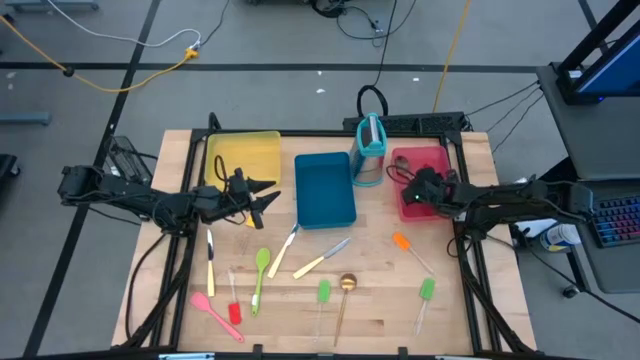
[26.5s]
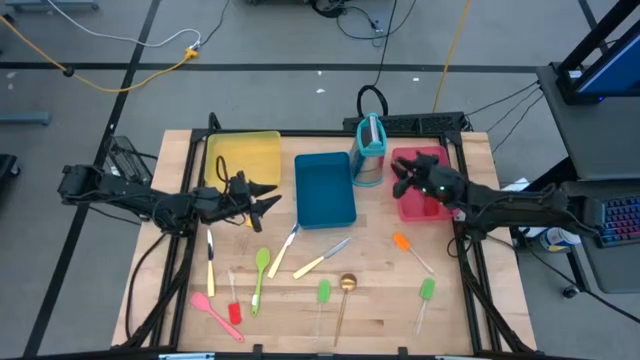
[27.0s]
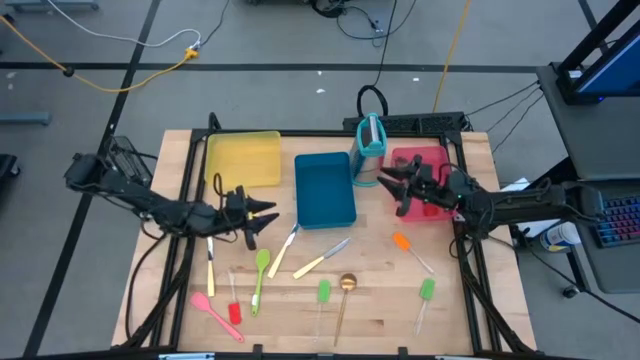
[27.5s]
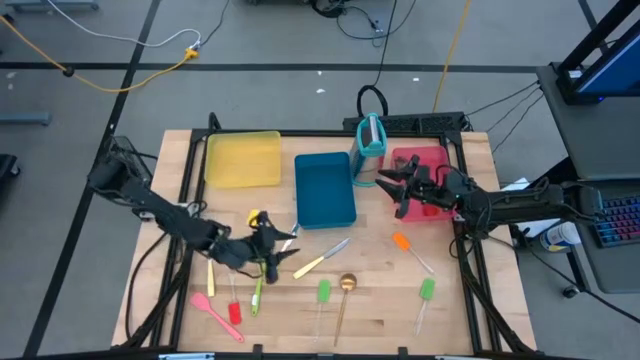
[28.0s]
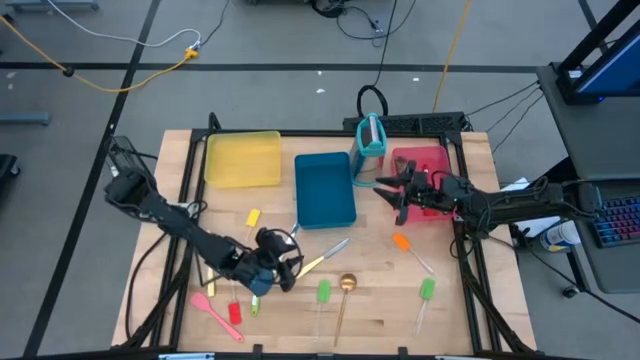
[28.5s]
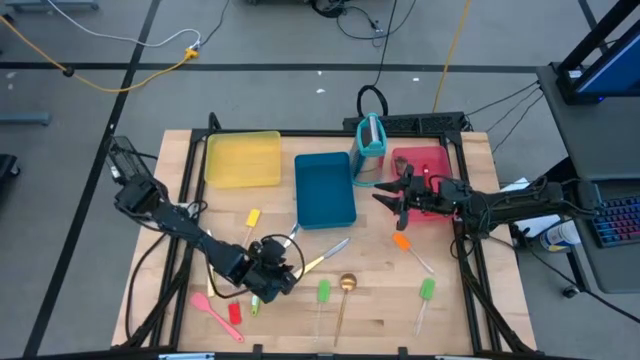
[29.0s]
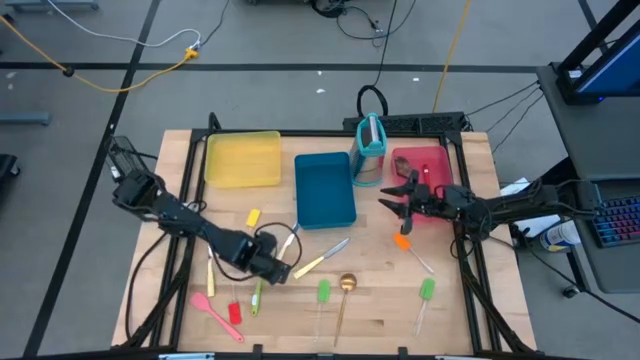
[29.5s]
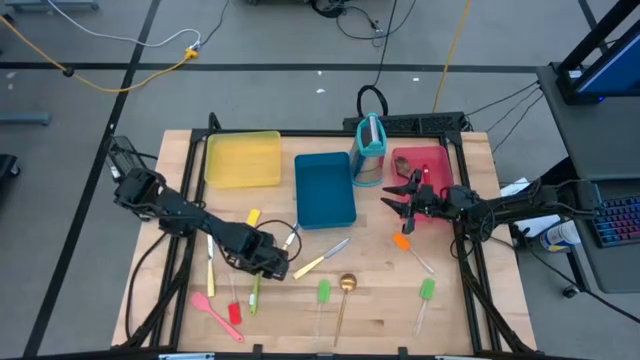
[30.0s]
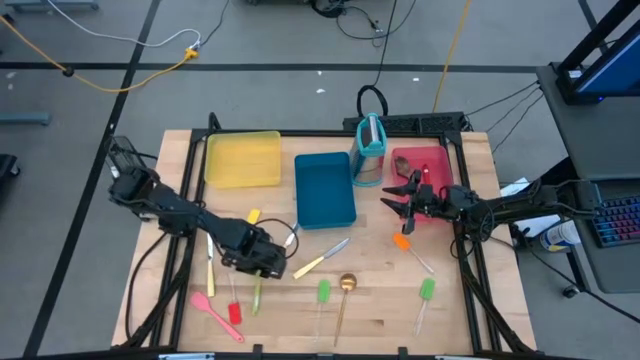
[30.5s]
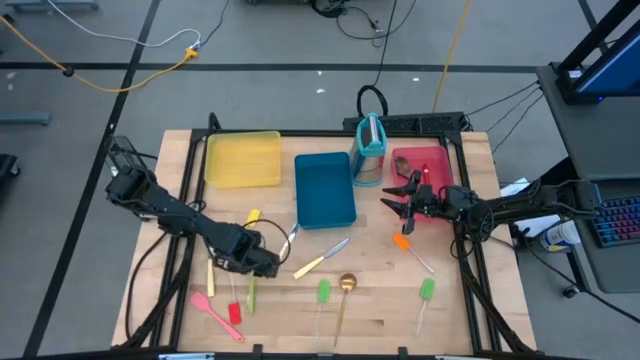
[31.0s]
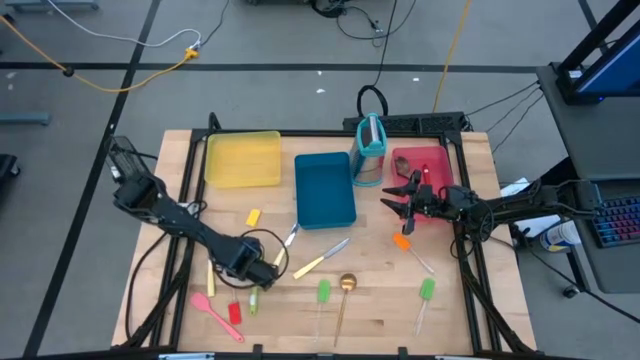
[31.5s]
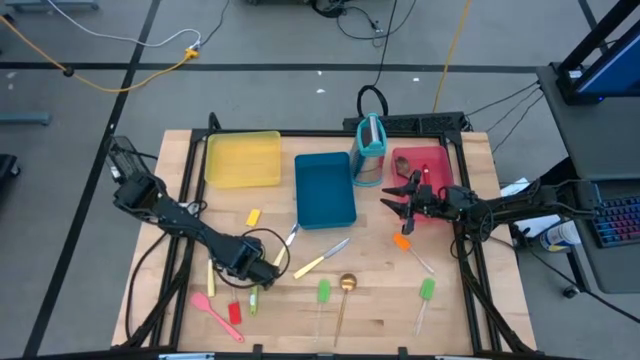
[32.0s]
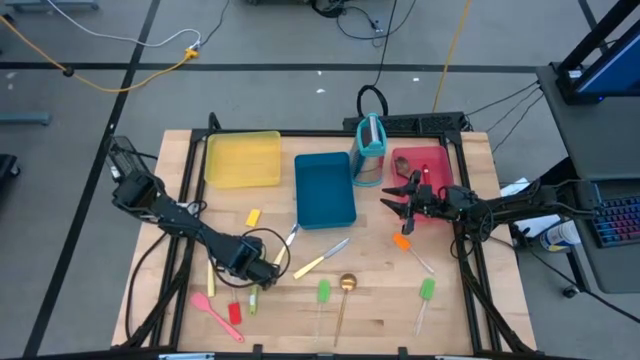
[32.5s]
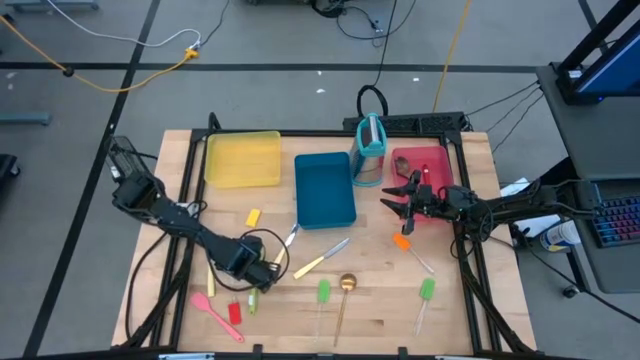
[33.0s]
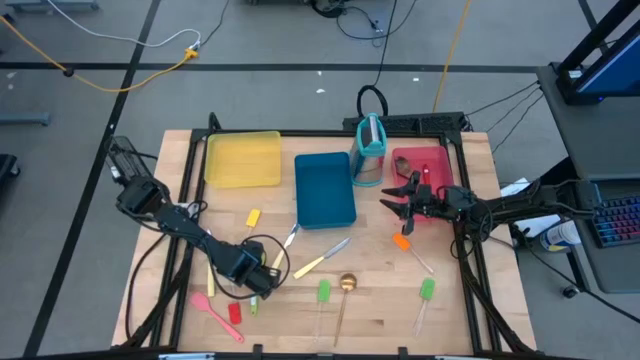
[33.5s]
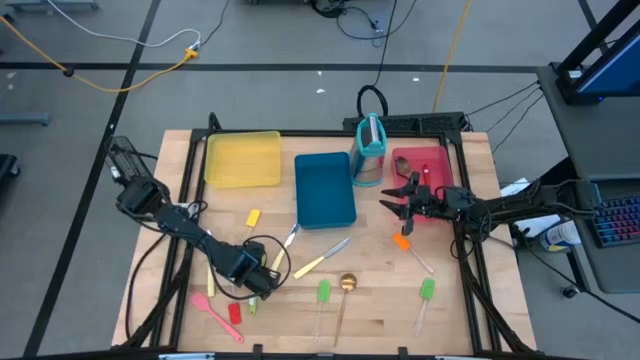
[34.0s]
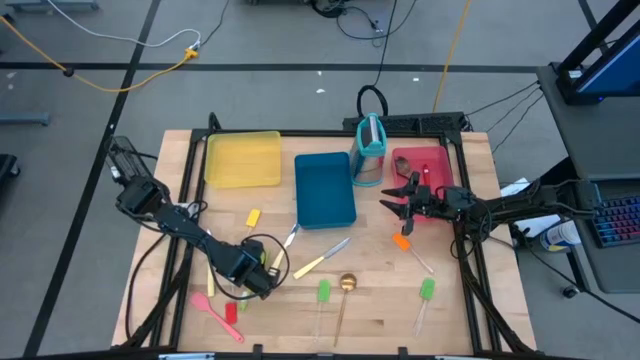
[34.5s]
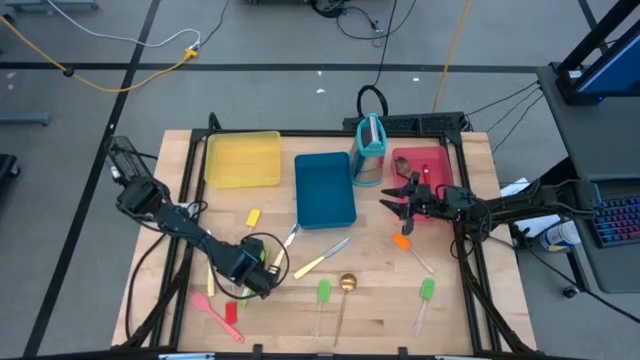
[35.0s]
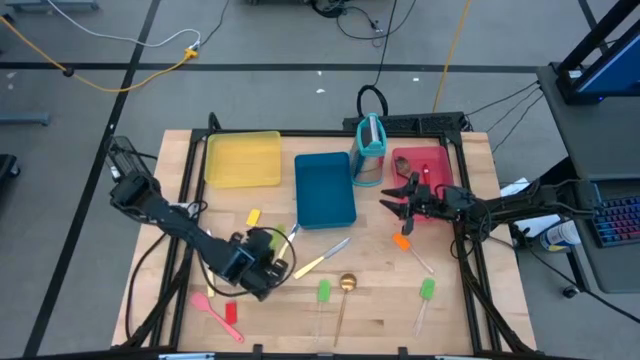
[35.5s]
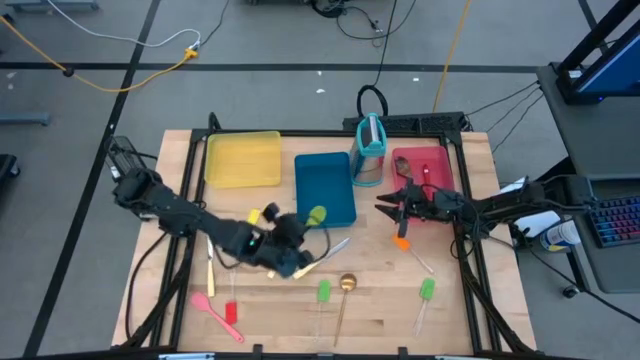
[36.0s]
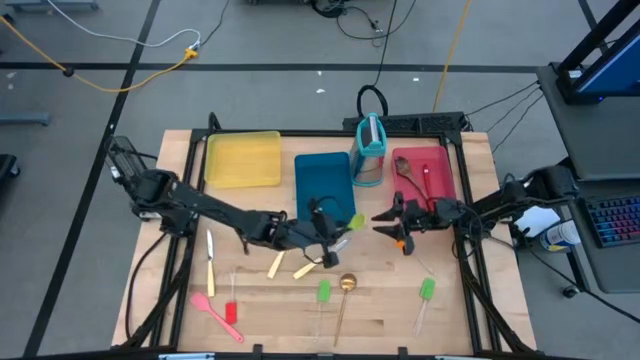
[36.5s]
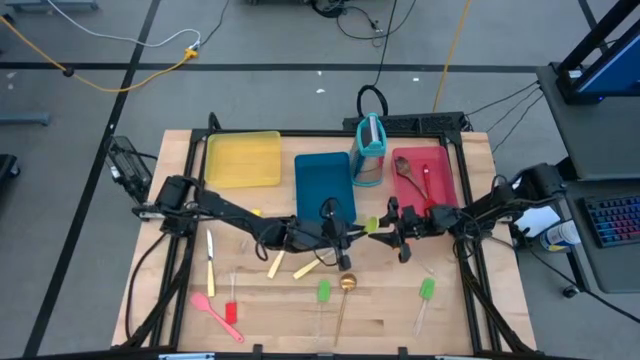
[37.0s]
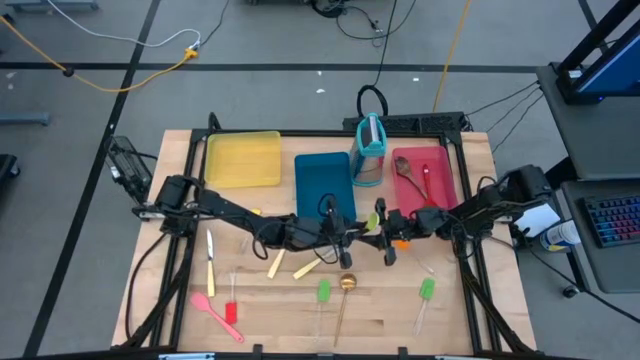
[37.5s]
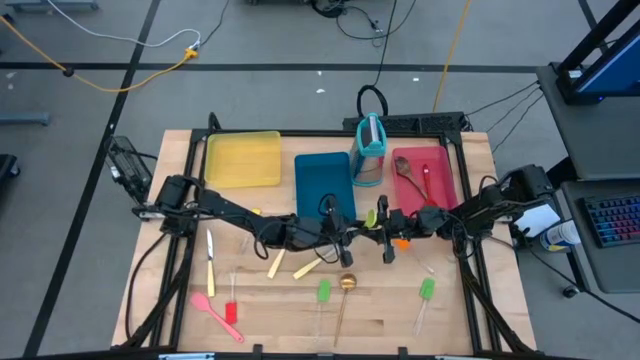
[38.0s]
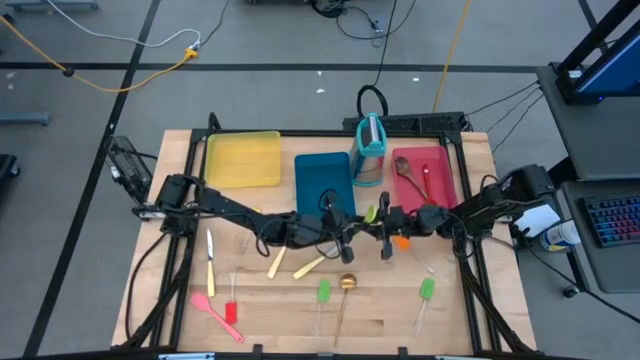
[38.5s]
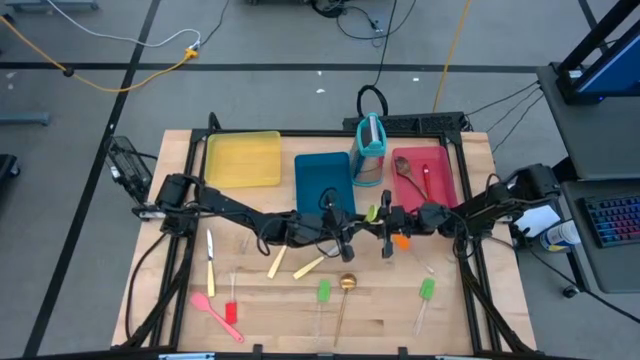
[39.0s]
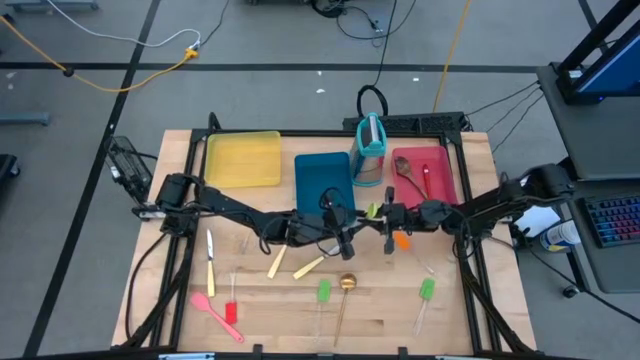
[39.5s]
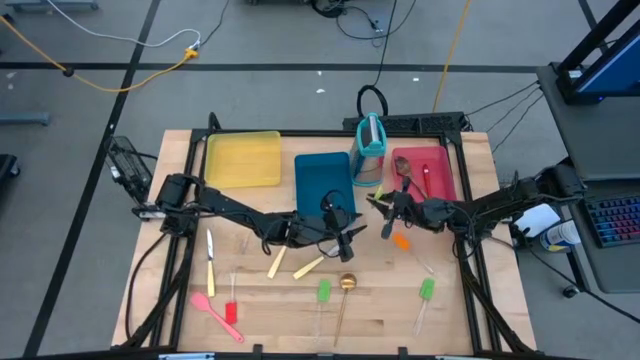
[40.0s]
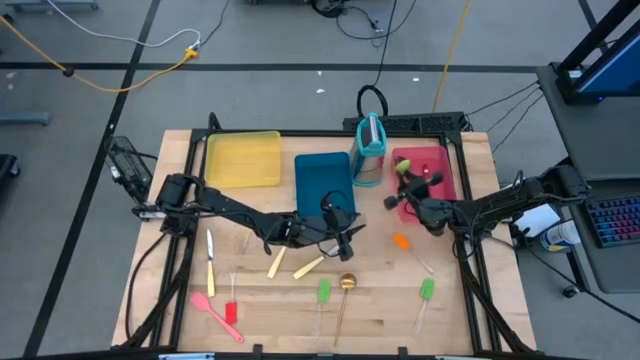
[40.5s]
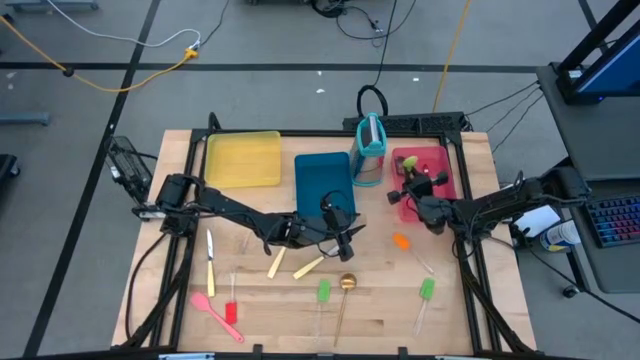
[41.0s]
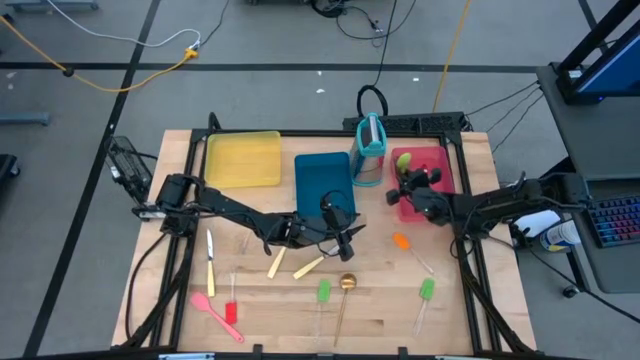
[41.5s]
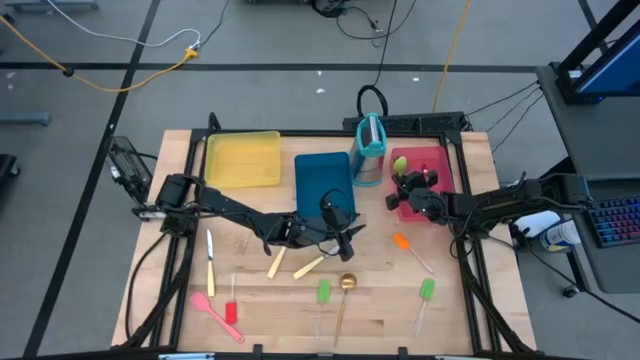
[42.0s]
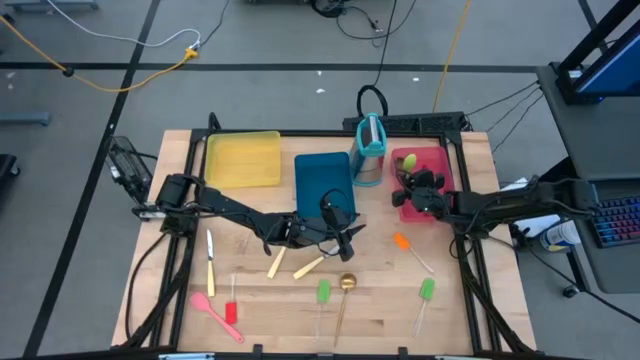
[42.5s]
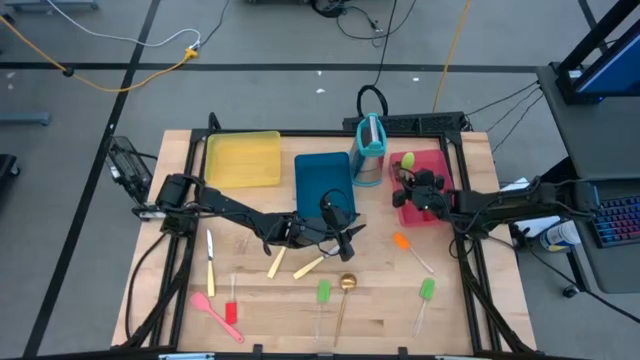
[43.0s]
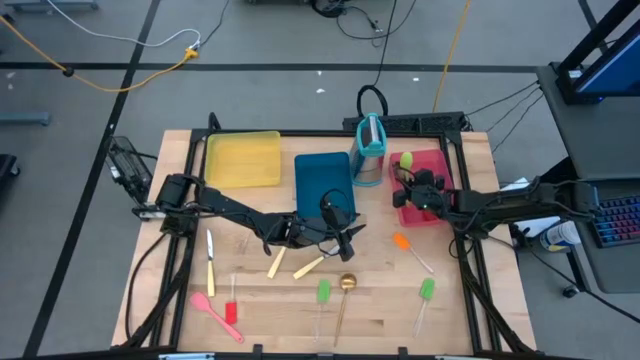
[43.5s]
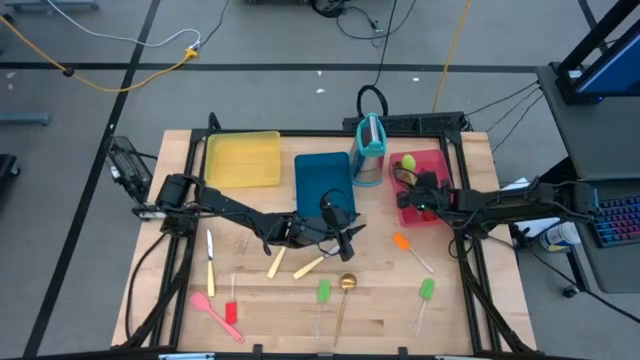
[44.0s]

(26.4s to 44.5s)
Task: Pick & Place Kitchen Items
Put the green serving spoon into the red bin

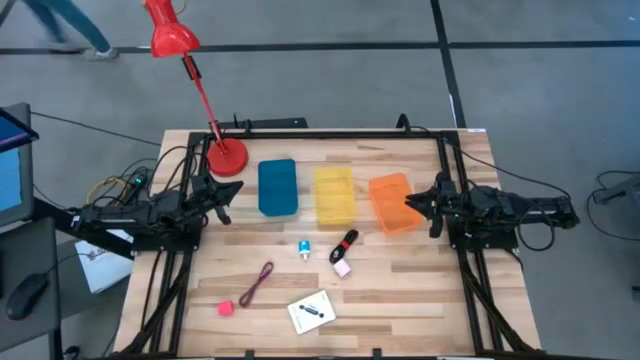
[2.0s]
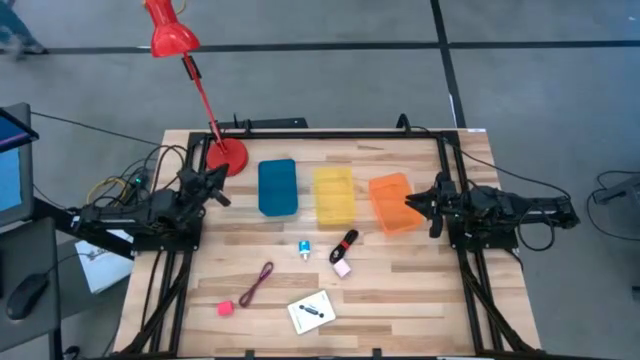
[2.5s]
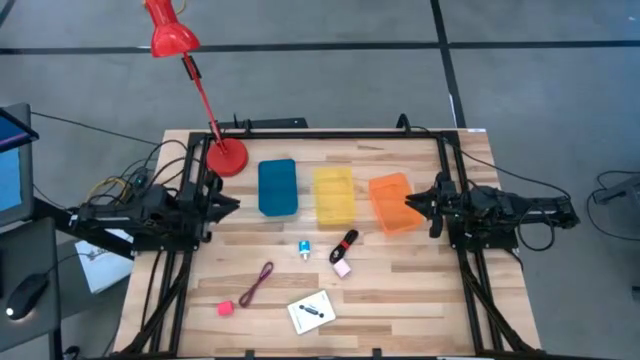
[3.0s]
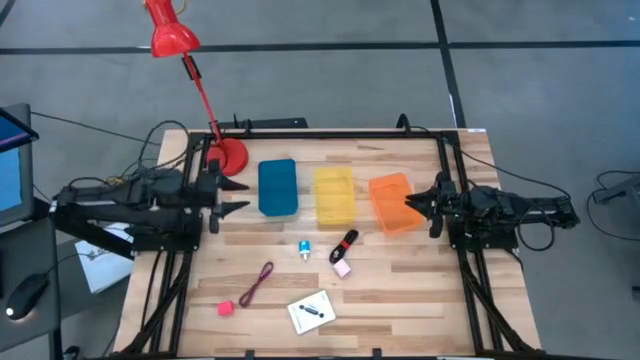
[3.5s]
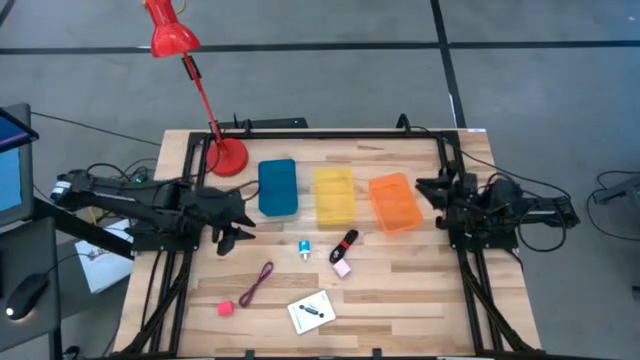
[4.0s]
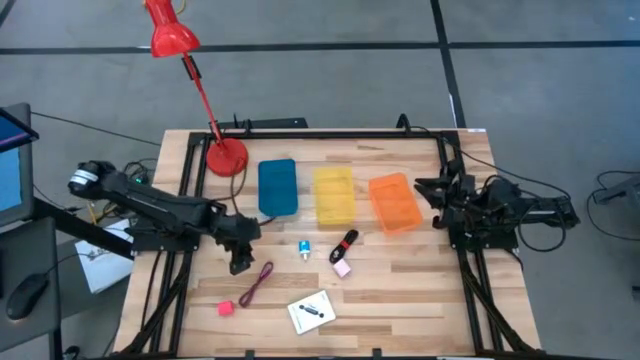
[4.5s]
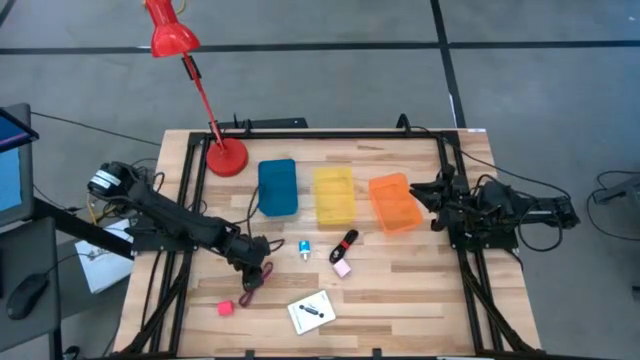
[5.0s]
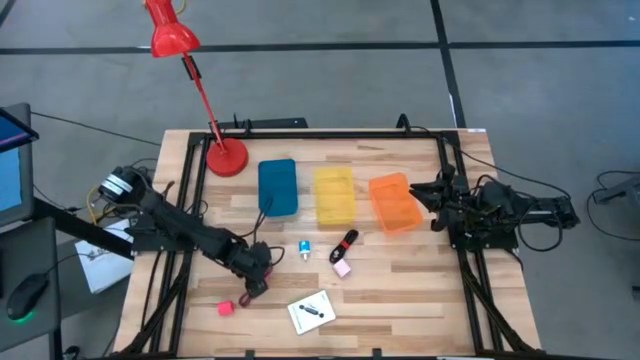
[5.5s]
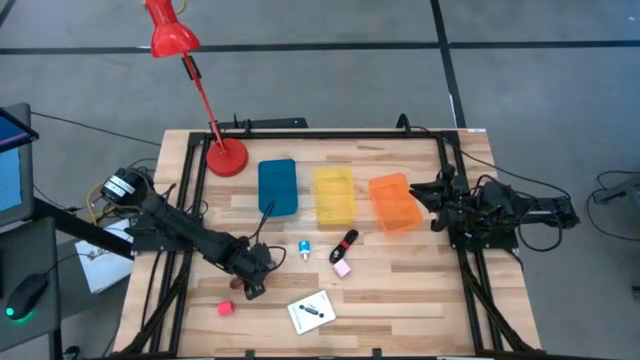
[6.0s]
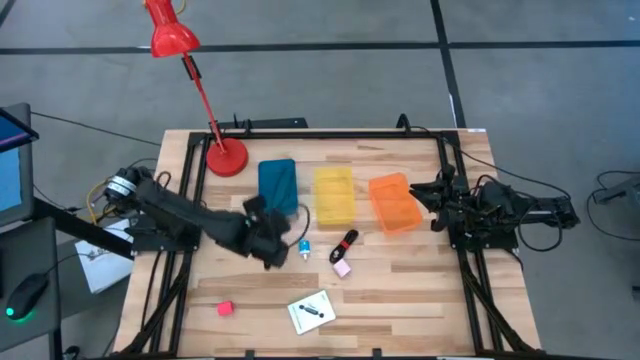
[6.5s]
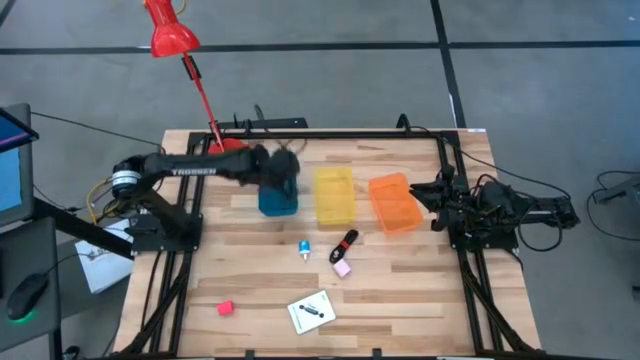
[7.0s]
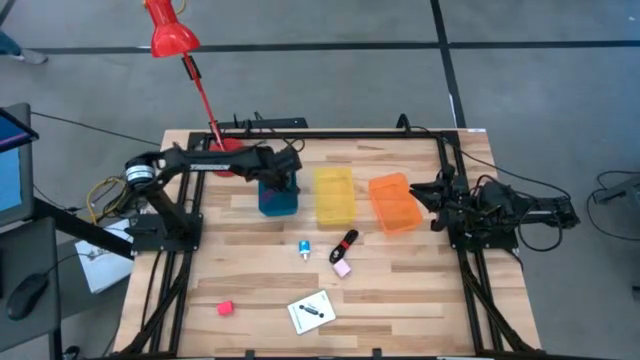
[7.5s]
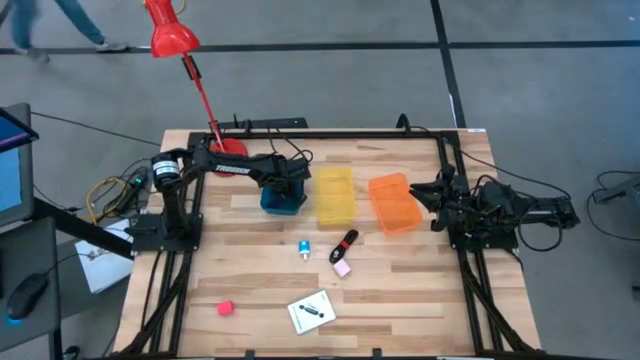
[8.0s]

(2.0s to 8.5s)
Task: Pick and place items into bin
Put the pink charger cable into the blue bin
